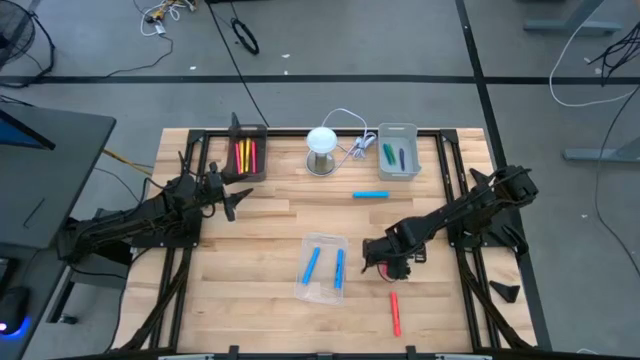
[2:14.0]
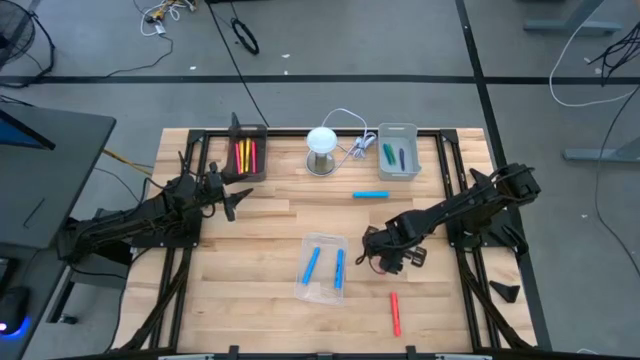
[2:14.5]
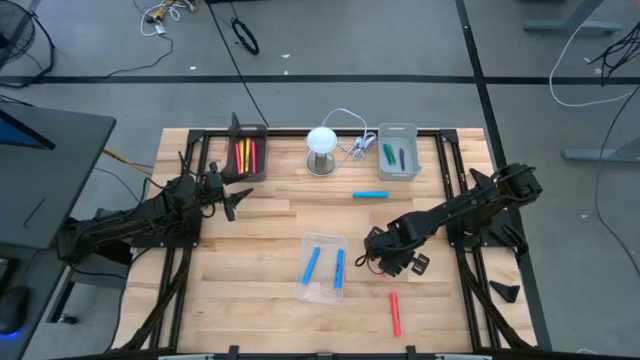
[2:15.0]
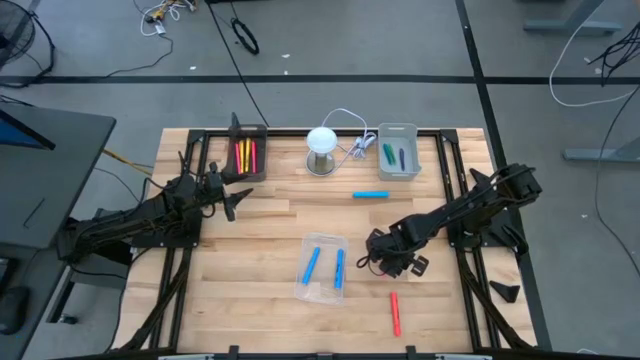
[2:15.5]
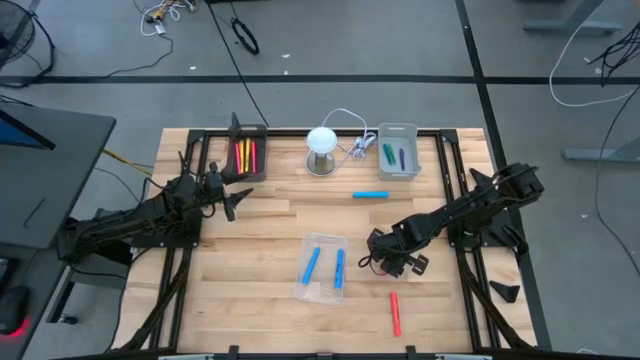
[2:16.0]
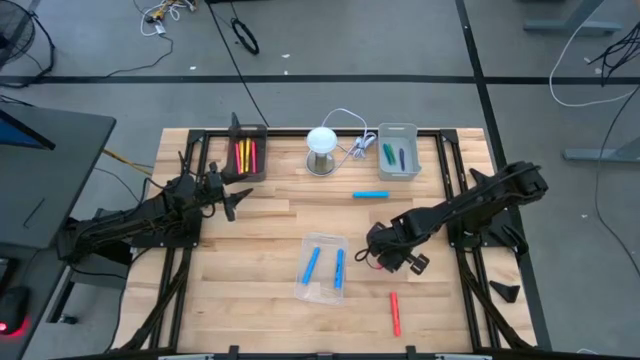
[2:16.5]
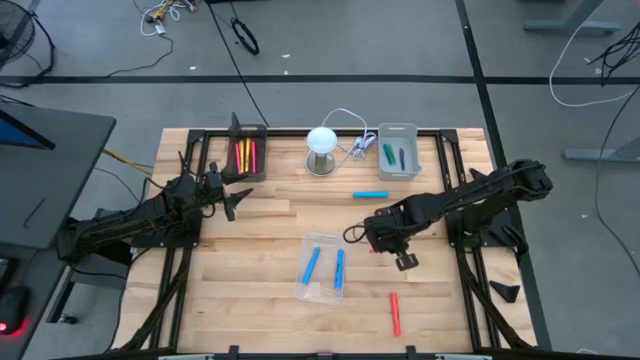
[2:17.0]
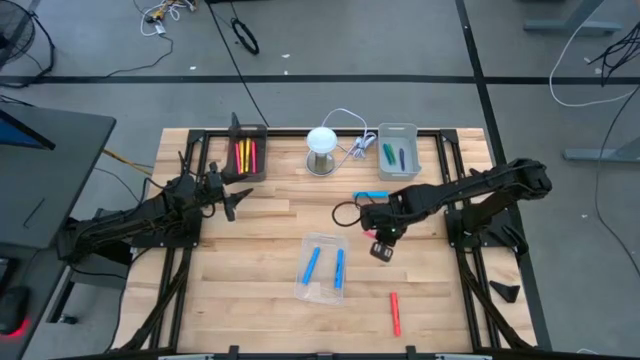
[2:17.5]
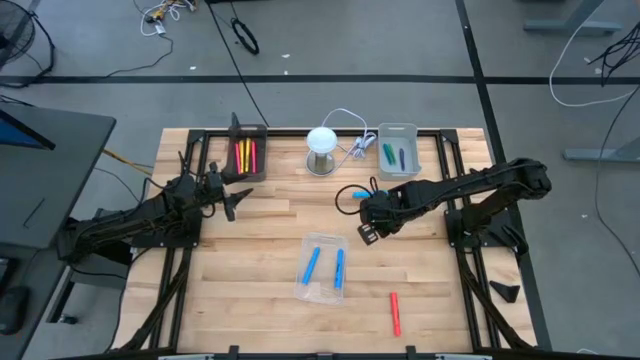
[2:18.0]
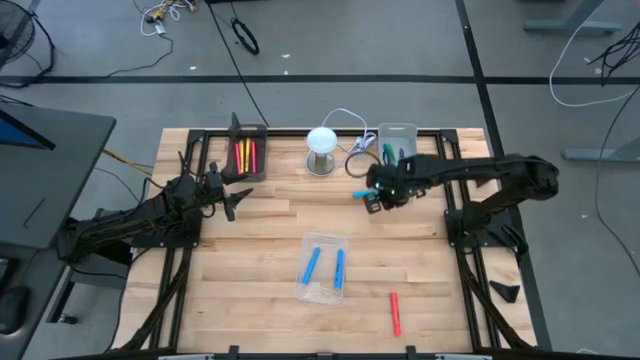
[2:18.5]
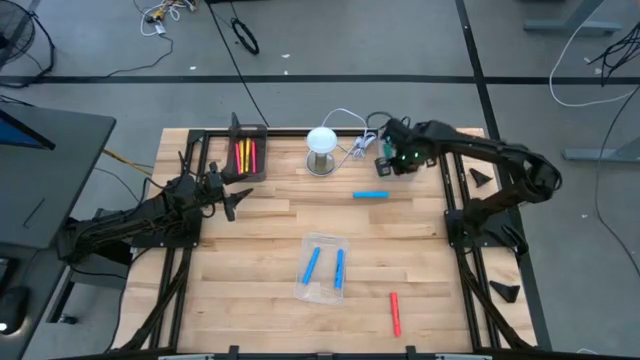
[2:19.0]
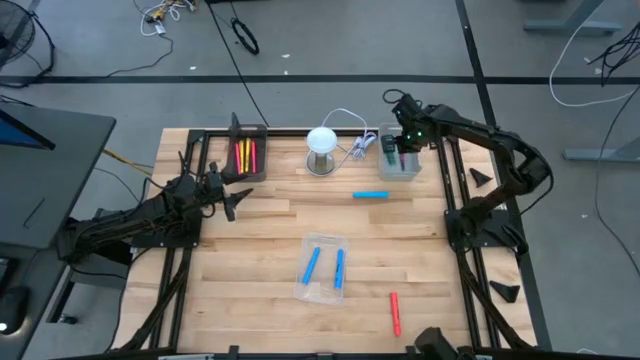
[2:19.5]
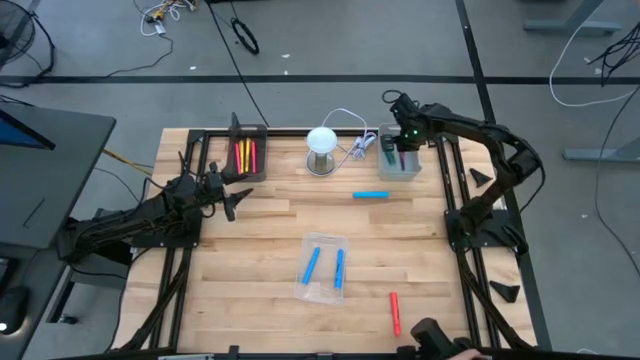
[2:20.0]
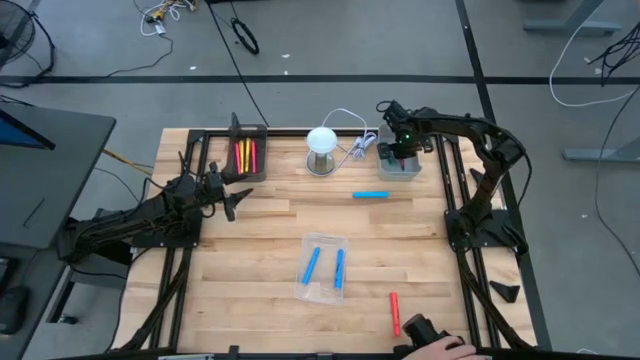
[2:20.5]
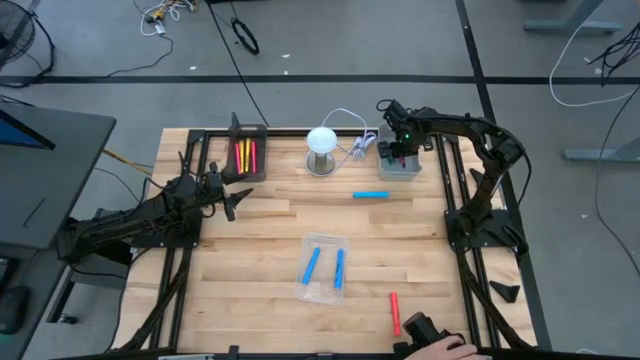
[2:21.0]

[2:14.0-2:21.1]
Task: Pick & Place Markers
Put the pink pen into the gray bin

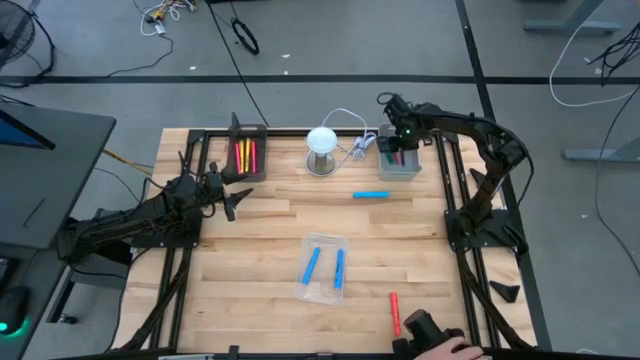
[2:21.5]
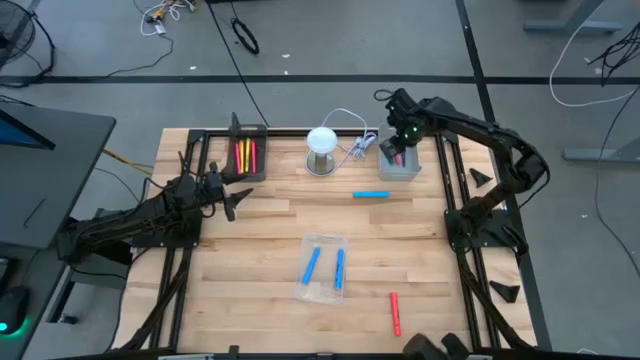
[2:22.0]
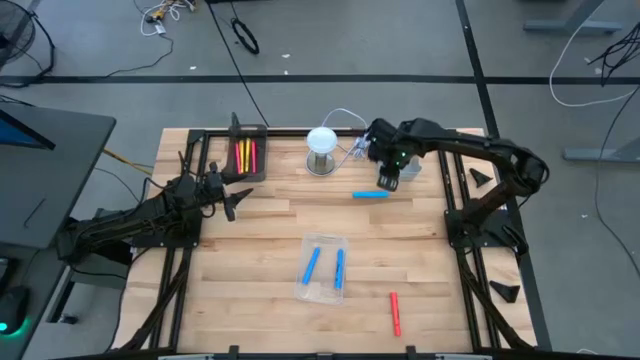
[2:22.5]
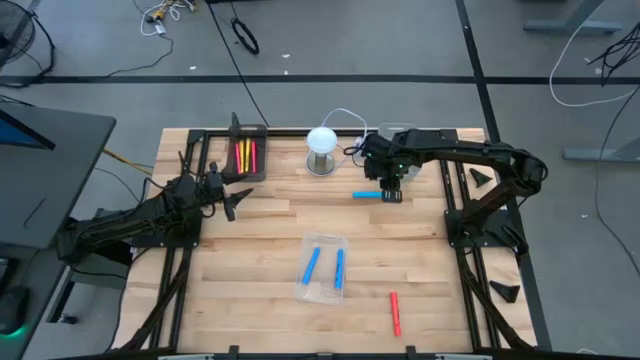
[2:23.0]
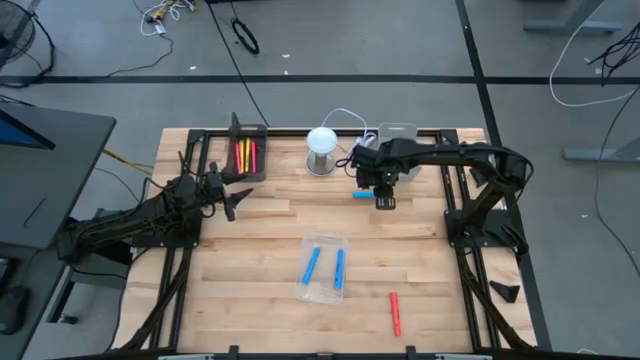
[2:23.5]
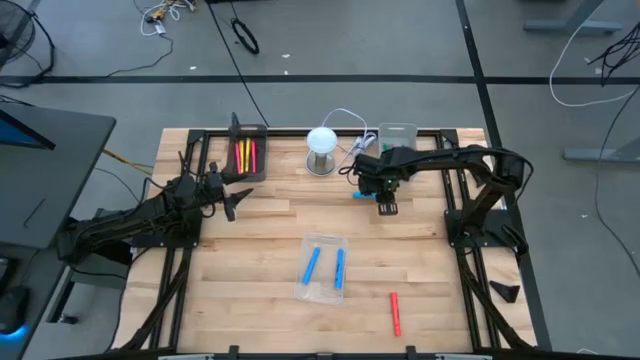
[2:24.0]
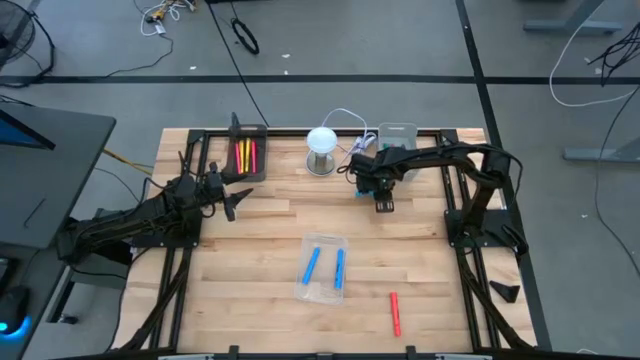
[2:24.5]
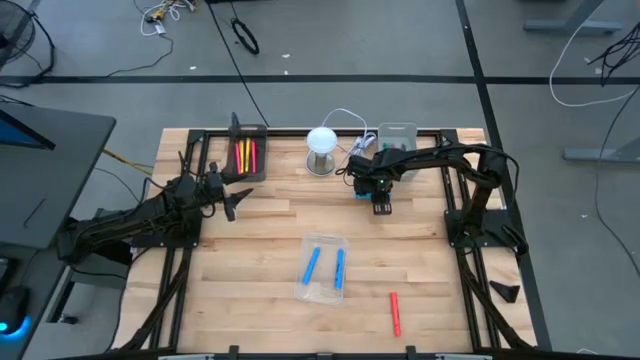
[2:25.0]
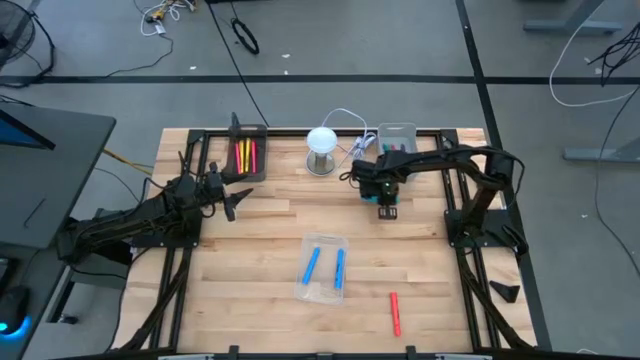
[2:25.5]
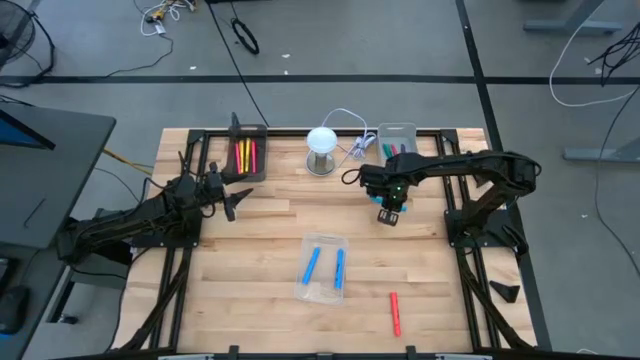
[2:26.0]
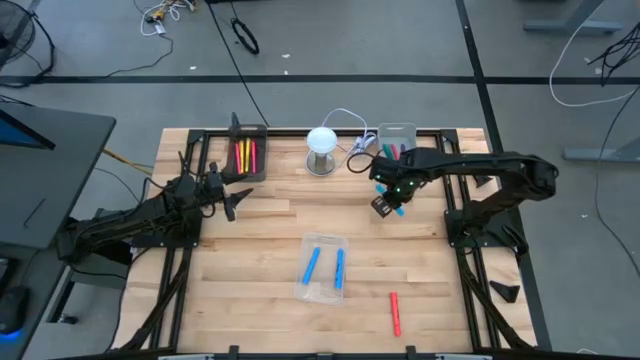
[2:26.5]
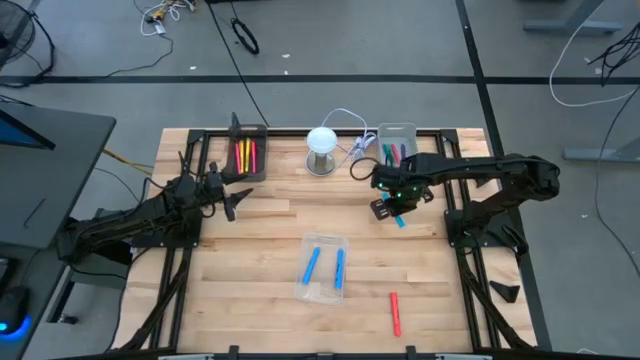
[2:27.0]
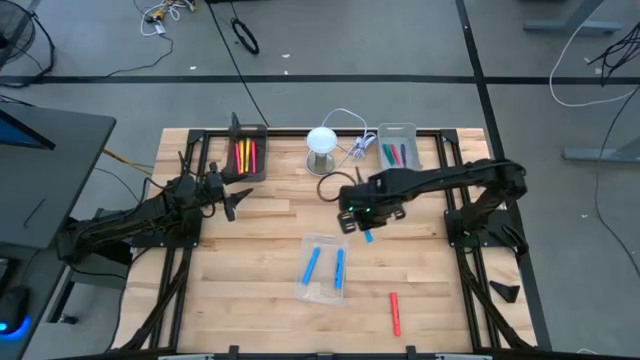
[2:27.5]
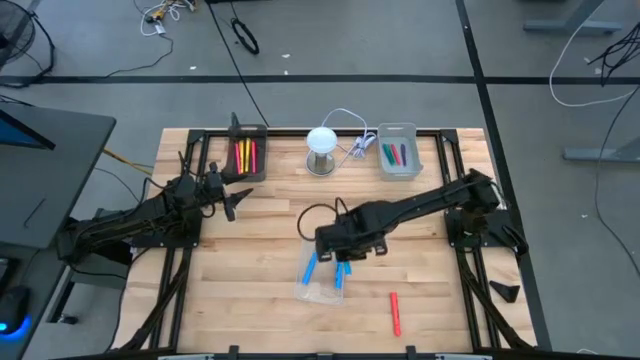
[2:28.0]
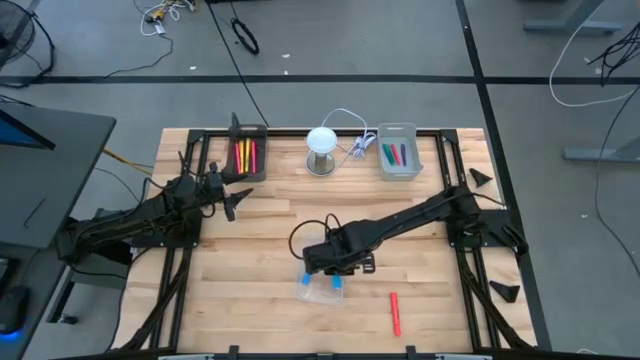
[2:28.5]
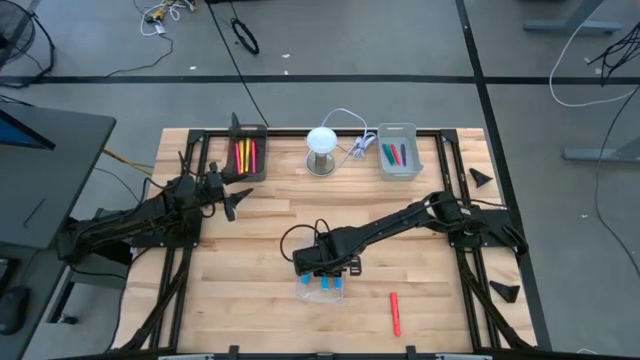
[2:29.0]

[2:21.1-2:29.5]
Put the blue highlighter into the transparent bin

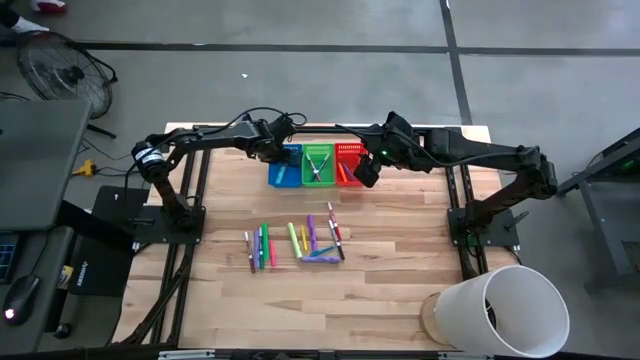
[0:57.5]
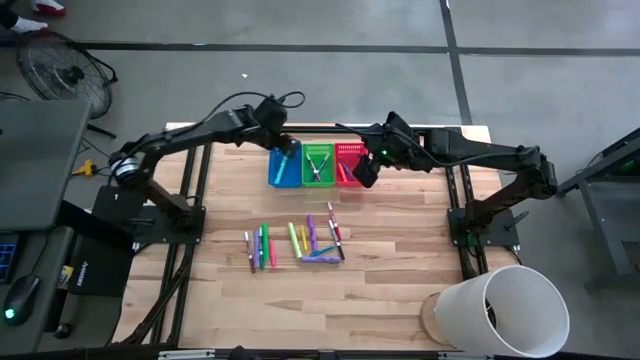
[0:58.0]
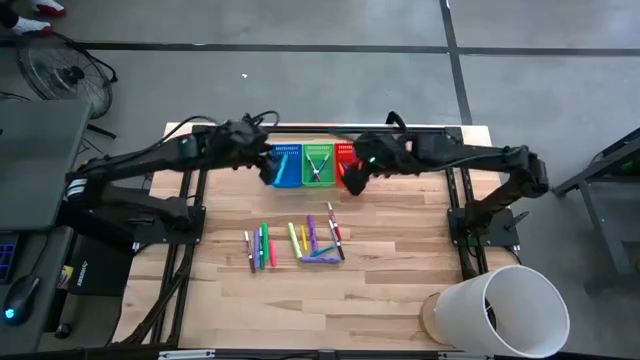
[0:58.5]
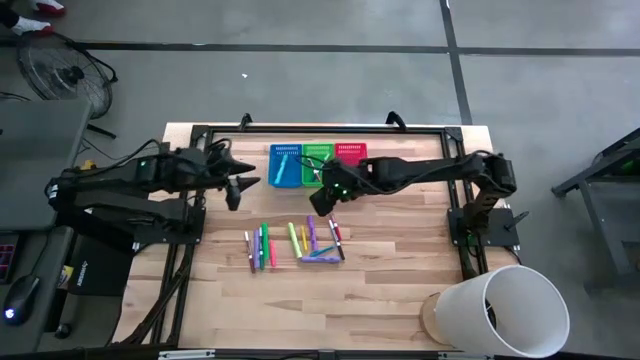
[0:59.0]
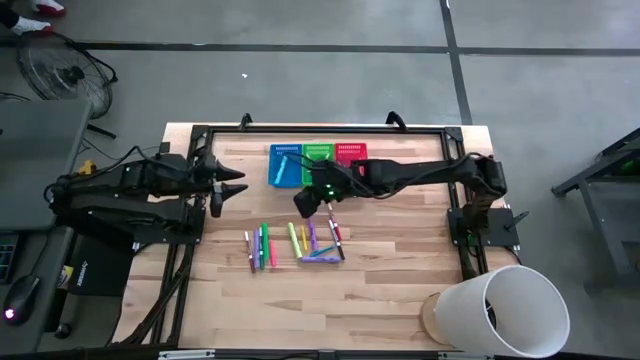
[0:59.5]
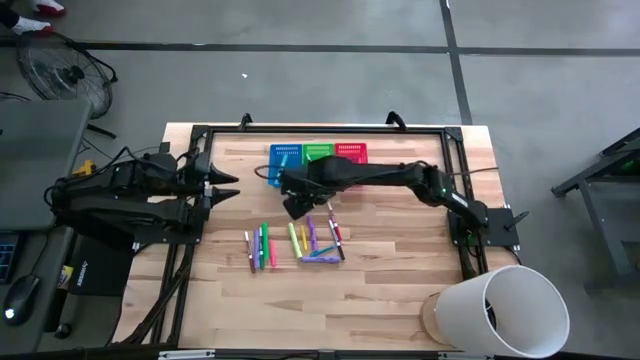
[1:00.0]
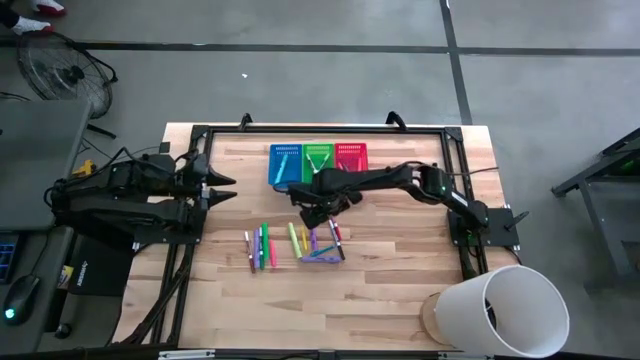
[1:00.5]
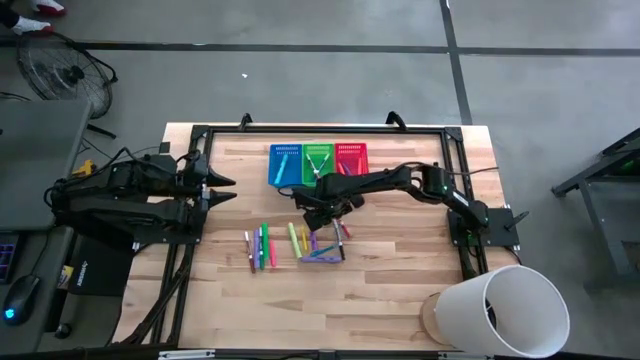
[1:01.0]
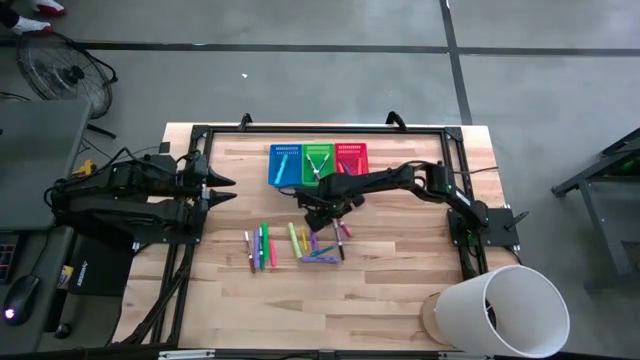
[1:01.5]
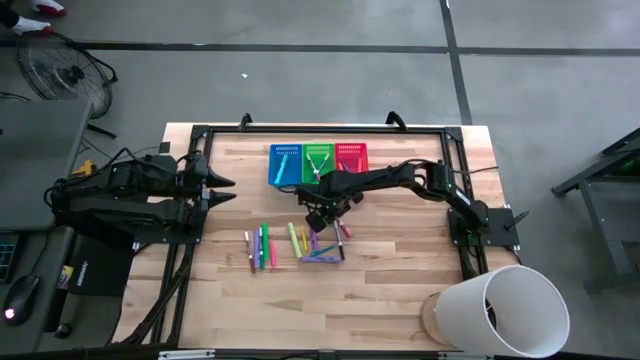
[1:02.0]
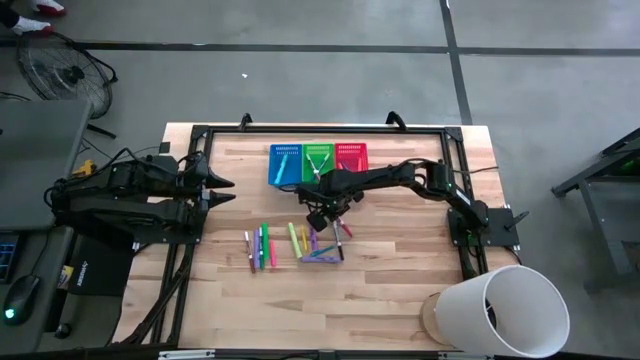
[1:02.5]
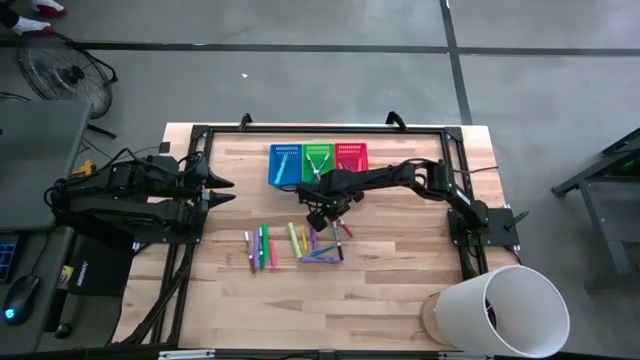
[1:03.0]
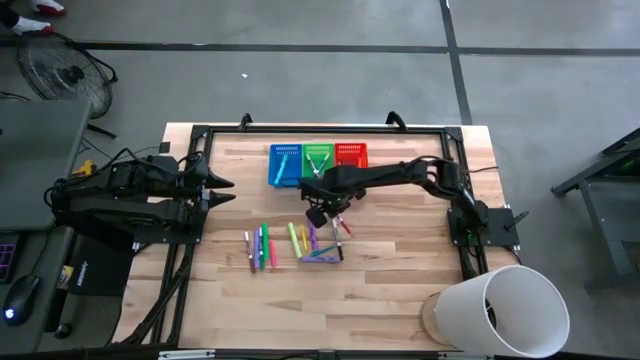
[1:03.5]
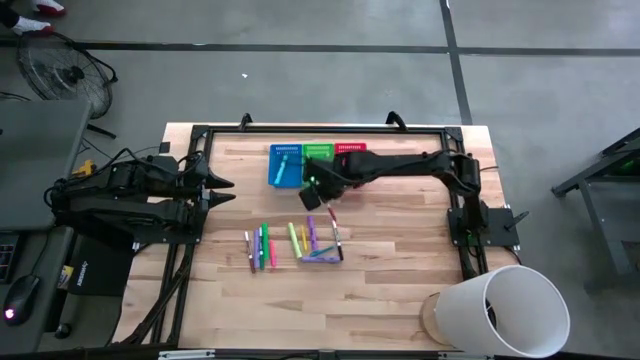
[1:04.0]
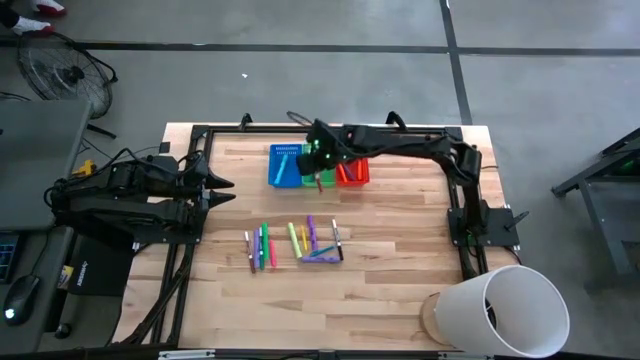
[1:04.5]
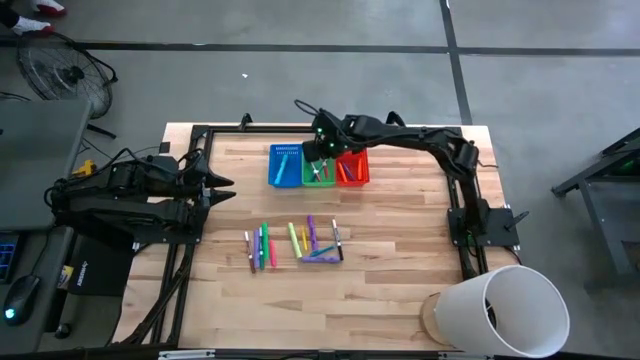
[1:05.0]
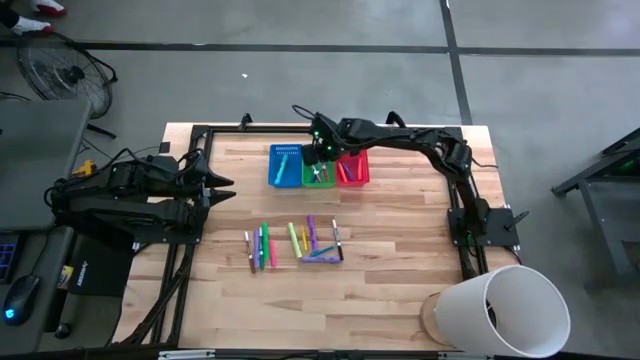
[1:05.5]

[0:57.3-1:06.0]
Task: Pick & Place Markers
Put the red marker pen into the green bin
